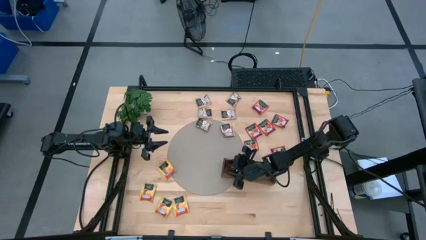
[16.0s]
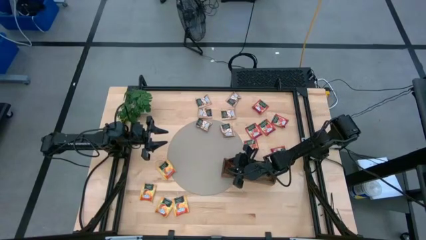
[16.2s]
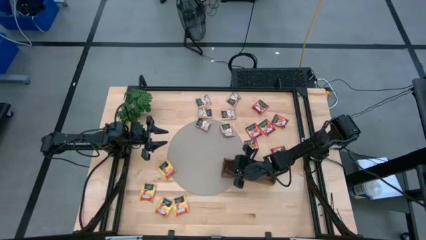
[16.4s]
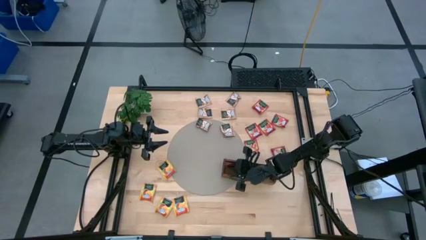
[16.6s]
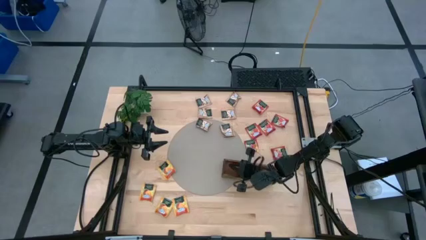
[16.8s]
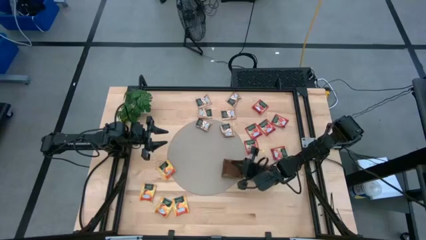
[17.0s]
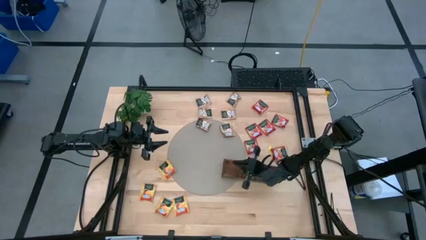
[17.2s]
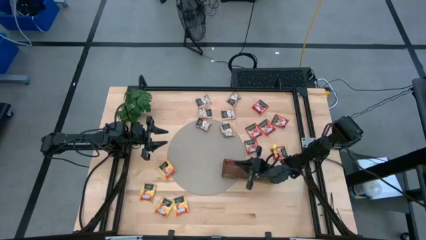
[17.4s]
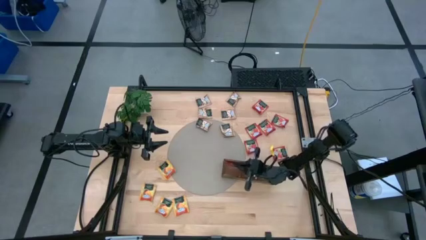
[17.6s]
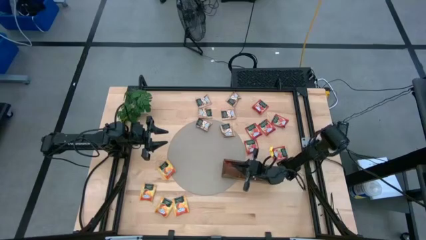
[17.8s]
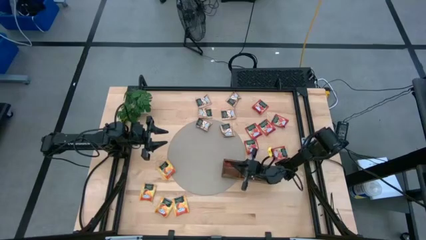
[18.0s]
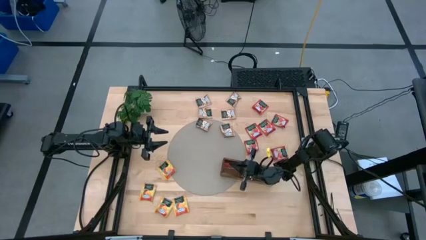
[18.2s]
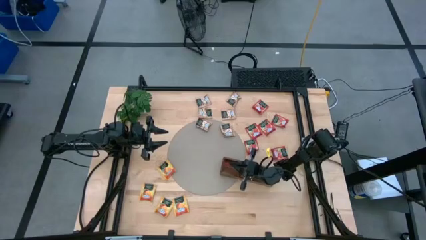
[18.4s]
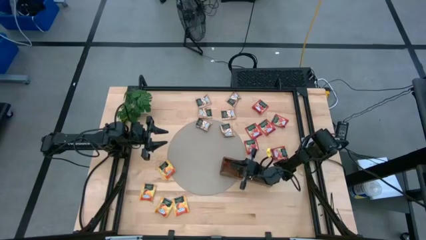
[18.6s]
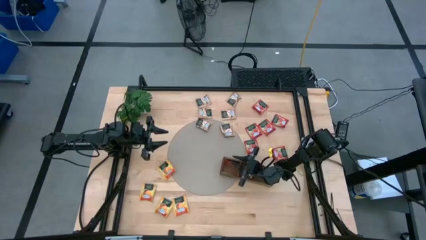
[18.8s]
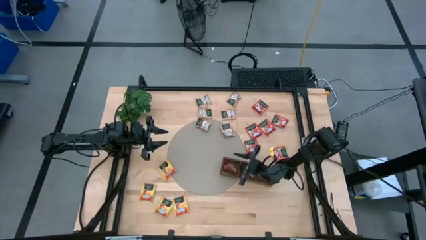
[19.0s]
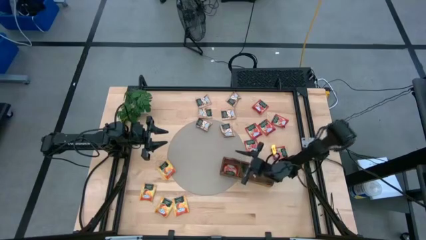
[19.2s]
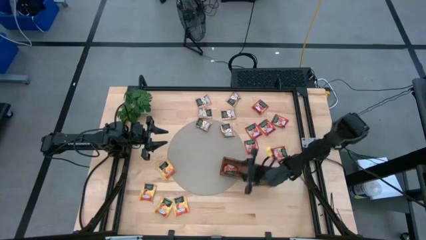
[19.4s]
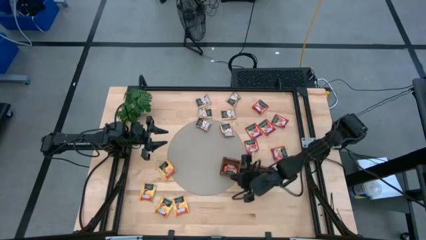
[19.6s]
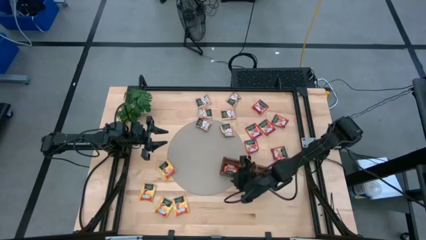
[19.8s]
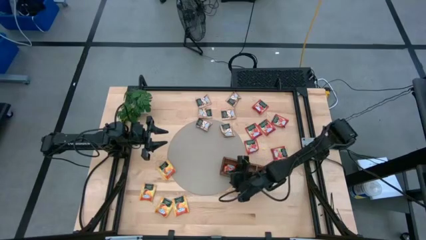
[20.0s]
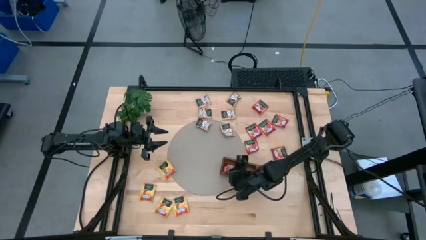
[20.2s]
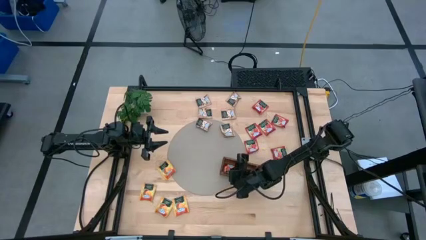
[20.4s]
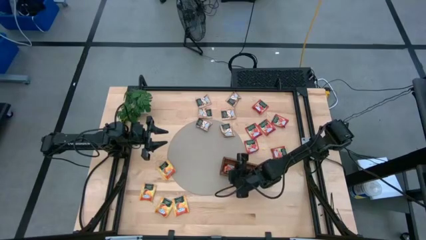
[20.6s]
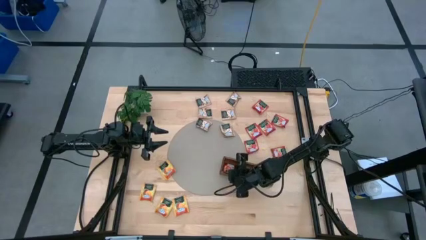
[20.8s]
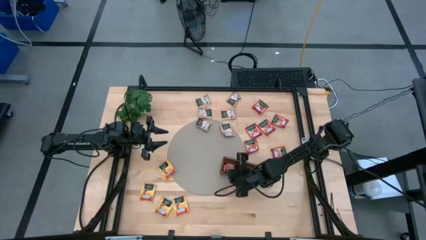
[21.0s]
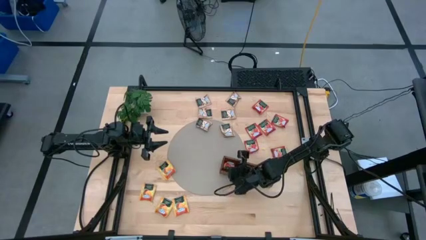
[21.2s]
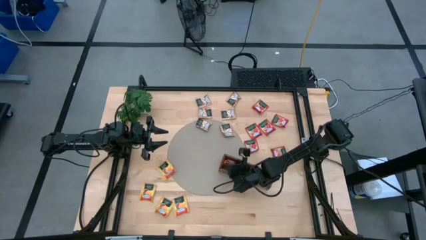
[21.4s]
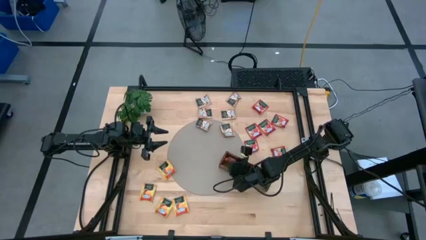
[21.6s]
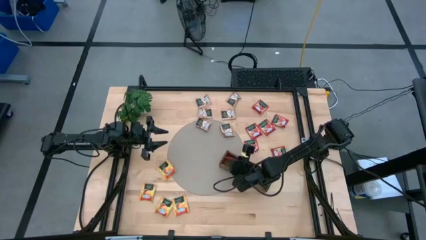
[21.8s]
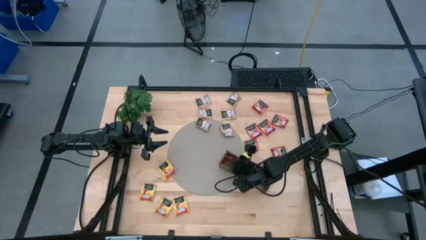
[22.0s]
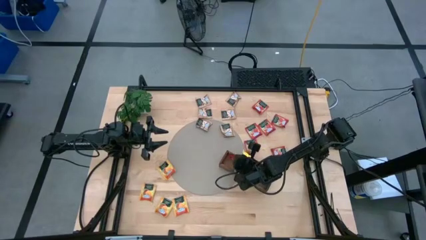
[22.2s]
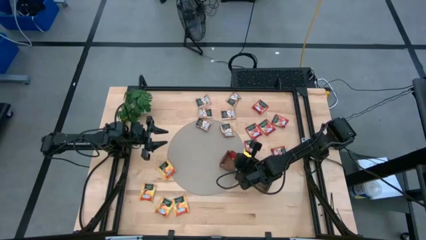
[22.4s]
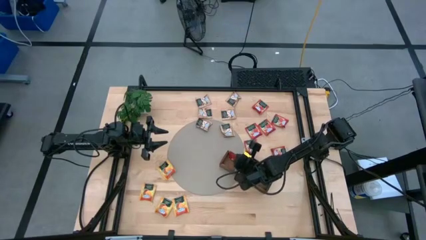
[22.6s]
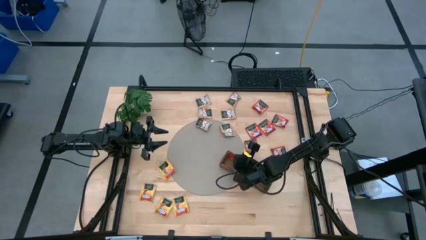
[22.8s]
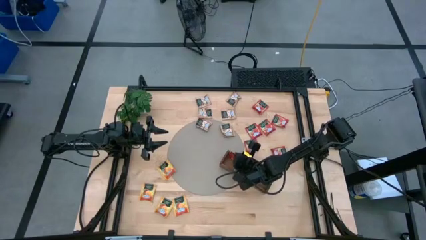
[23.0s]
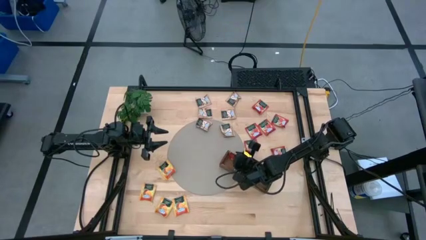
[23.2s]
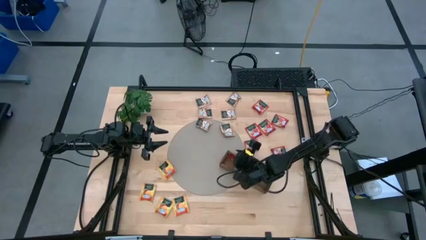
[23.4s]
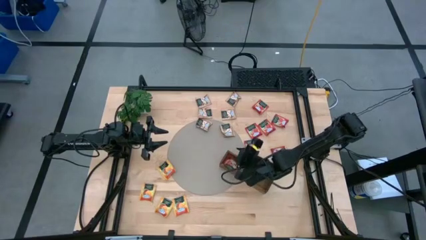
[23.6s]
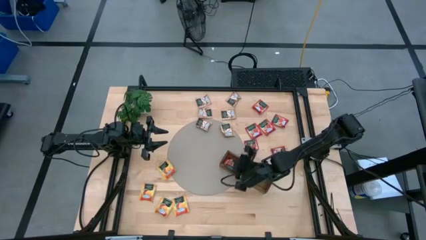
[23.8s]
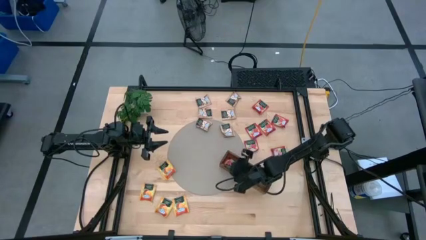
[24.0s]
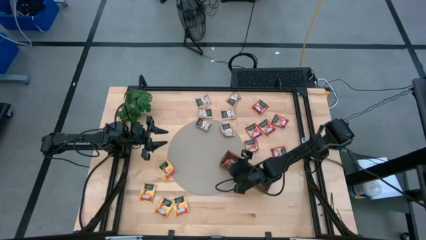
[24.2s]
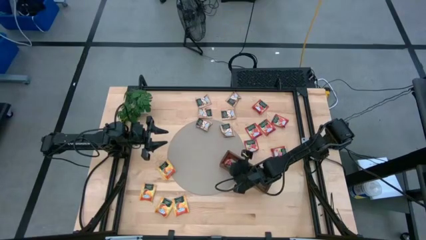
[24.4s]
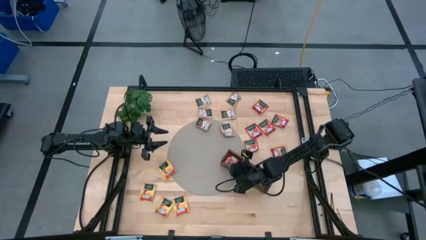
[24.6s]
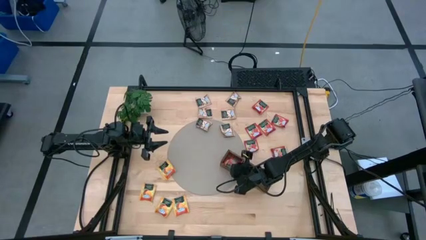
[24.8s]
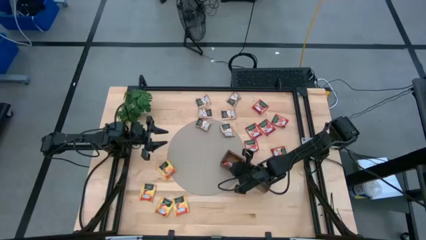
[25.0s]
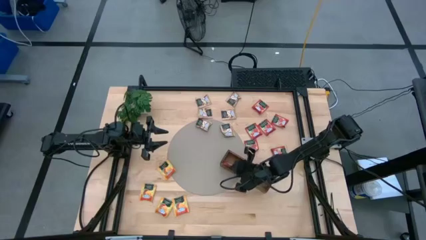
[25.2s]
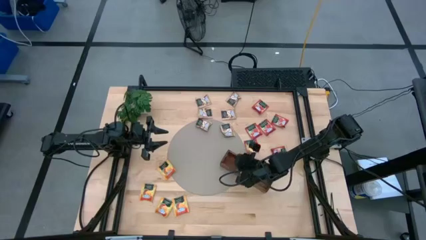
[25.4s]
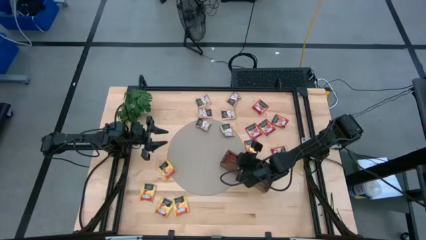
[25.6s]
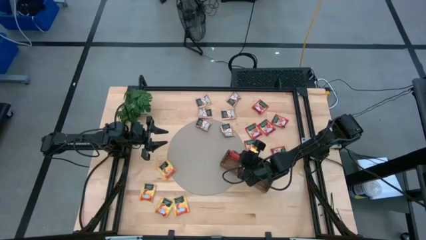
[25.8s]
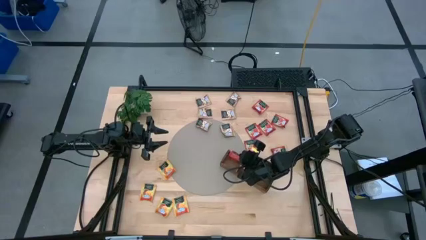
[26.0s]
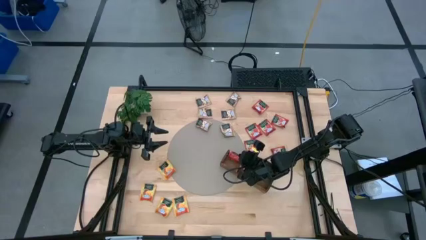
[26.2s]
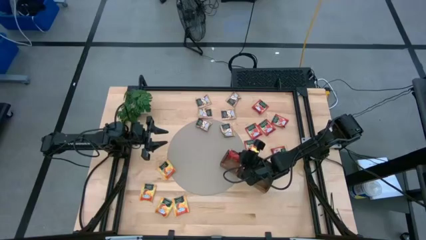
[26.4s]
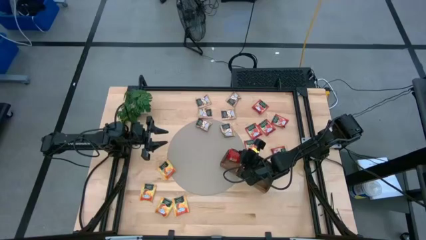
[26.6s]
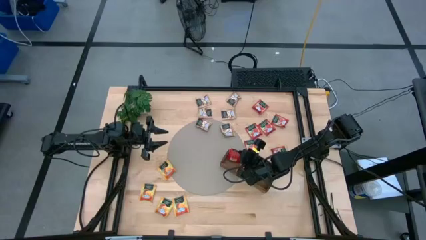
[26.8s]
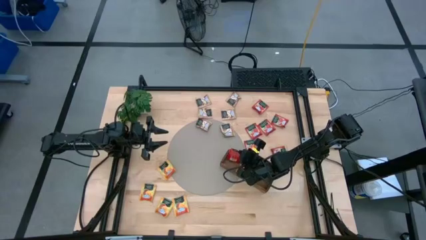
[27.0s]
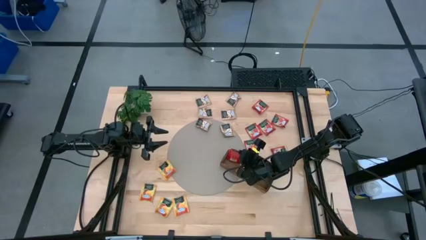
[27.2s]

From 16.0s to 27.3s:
Task: Pick & Place Tea
Put the red tea bag into the left section of the wooden organizer

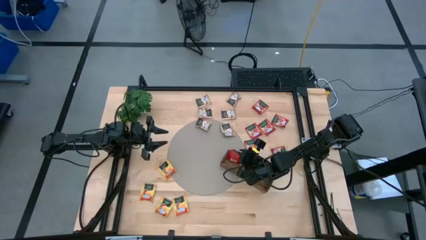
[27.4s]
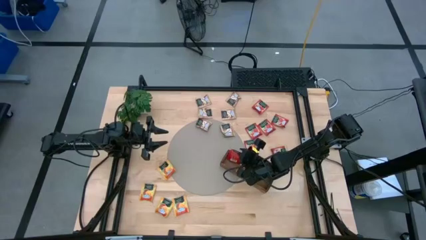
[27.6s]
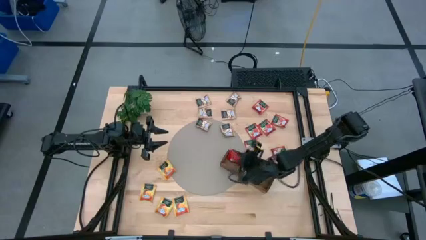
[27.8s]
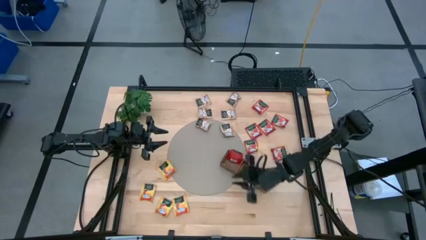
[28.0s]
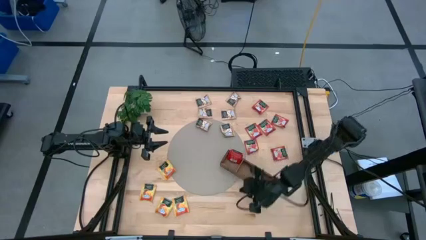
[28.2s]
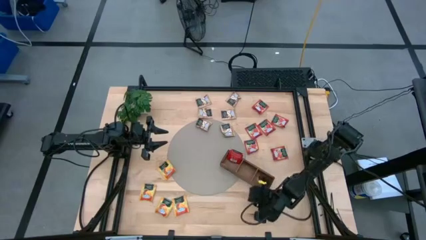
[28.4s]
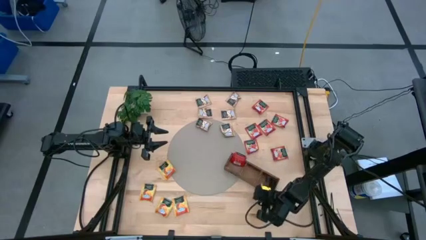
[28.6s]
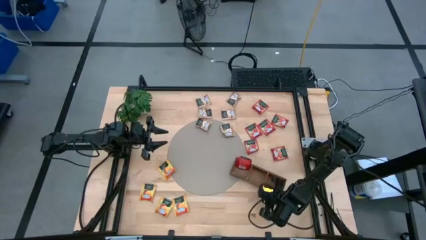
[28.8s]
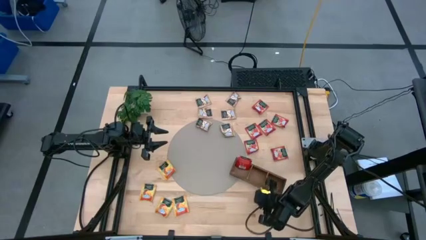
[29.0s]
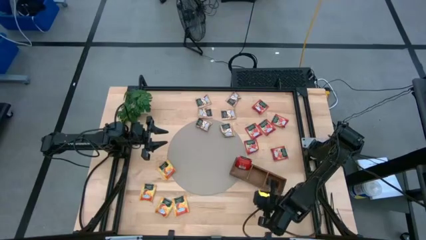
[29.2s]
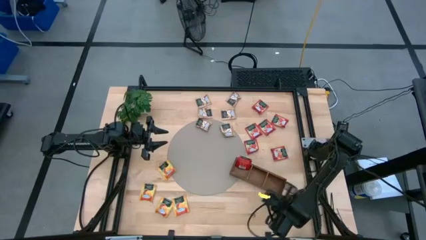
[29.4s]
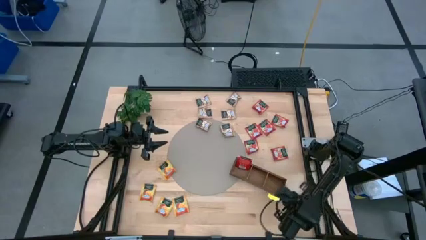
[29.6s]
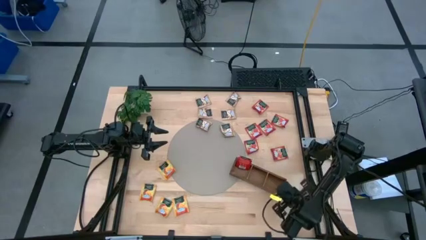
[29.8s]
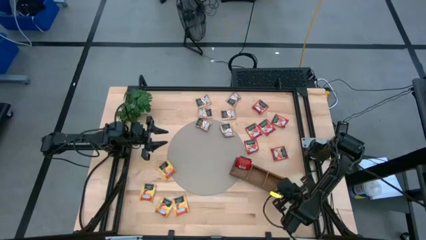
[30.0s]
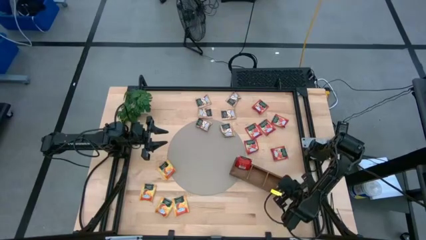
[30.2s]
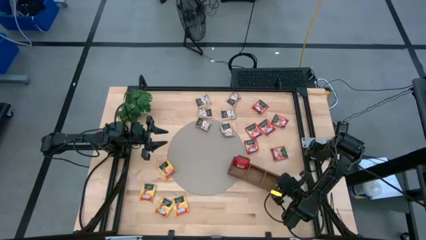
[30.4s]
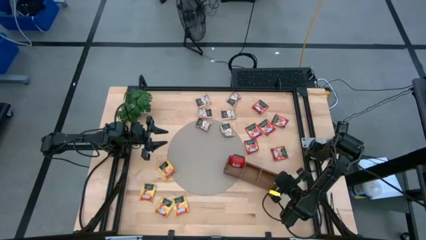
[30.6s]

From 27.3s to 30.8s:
Adjust the wooden organizer
